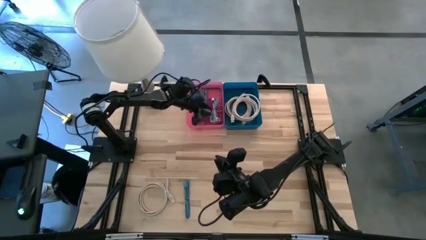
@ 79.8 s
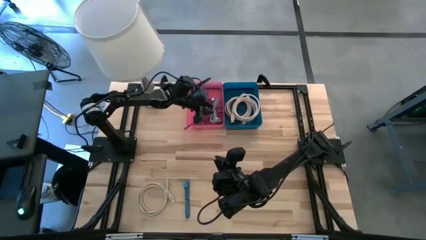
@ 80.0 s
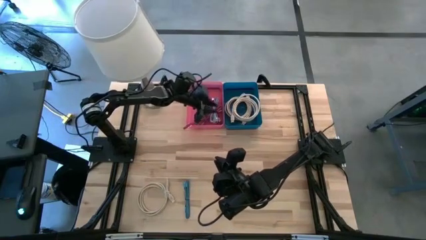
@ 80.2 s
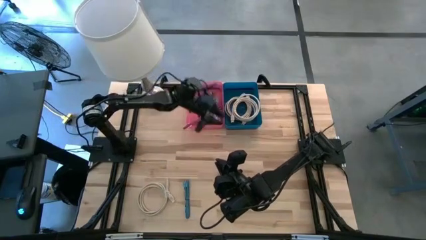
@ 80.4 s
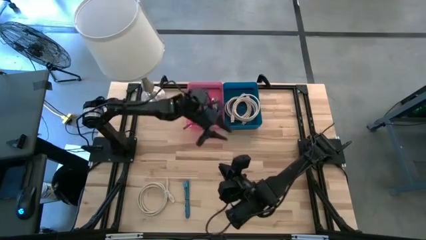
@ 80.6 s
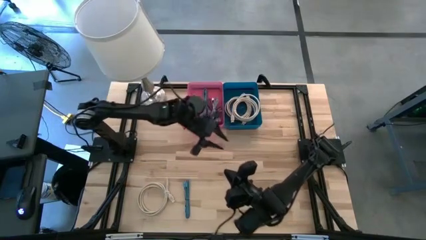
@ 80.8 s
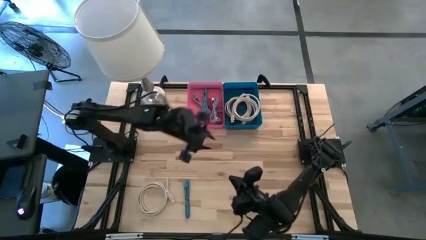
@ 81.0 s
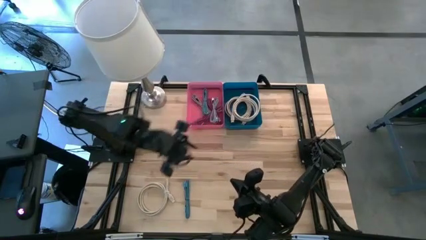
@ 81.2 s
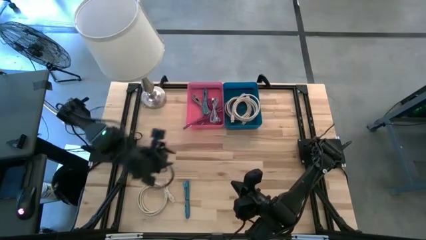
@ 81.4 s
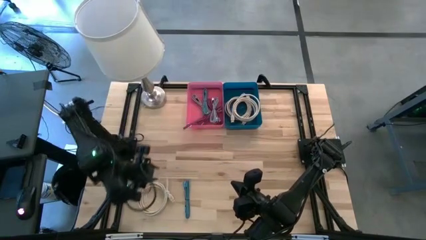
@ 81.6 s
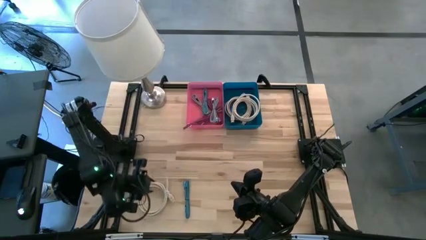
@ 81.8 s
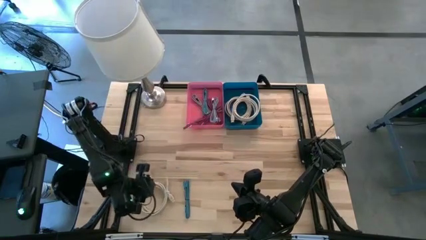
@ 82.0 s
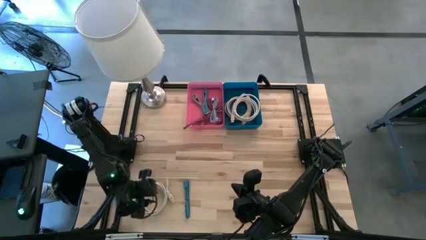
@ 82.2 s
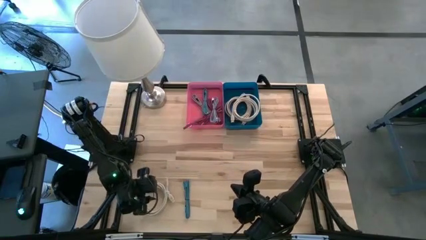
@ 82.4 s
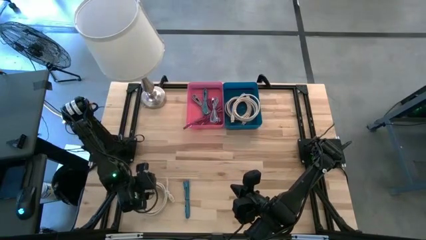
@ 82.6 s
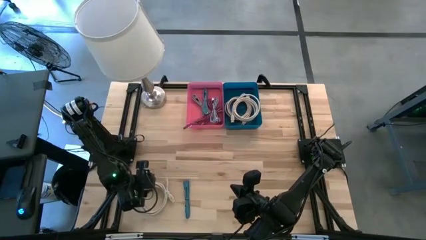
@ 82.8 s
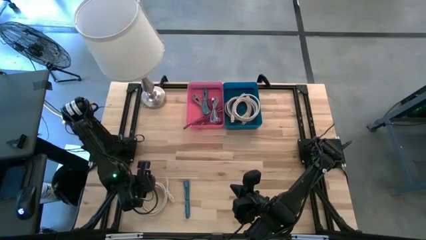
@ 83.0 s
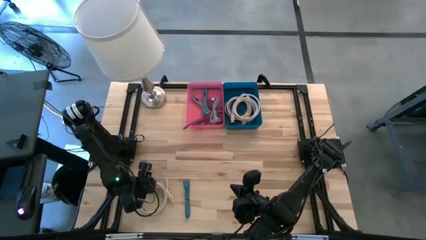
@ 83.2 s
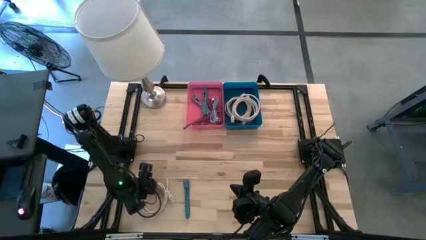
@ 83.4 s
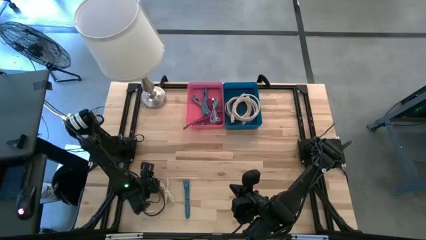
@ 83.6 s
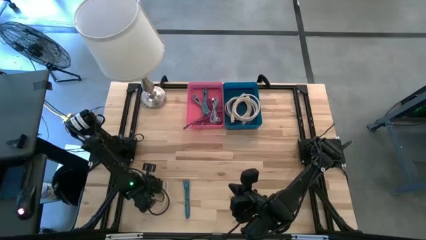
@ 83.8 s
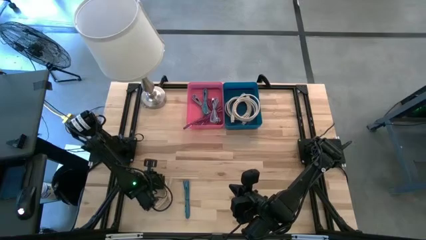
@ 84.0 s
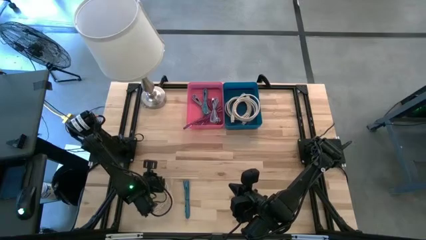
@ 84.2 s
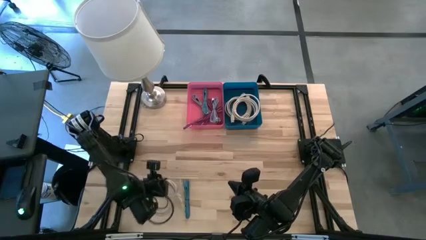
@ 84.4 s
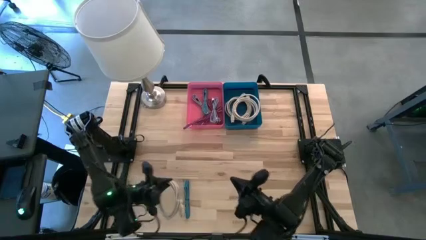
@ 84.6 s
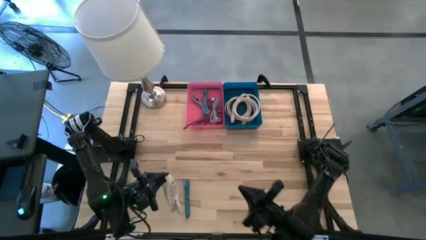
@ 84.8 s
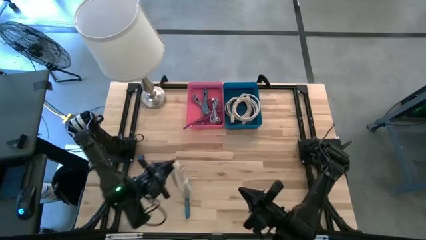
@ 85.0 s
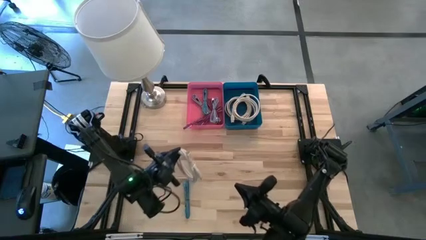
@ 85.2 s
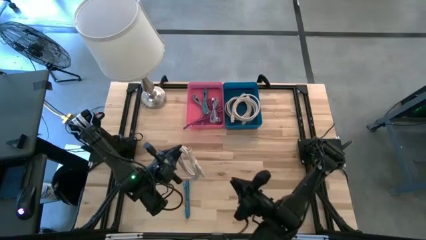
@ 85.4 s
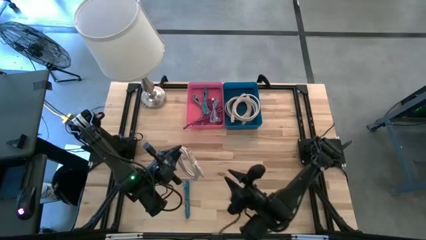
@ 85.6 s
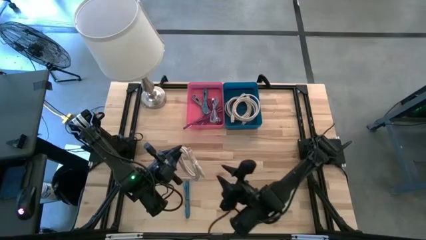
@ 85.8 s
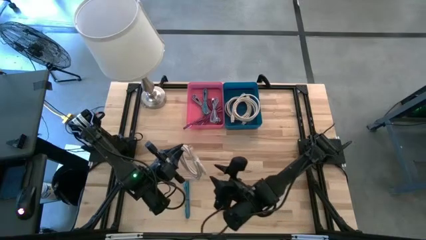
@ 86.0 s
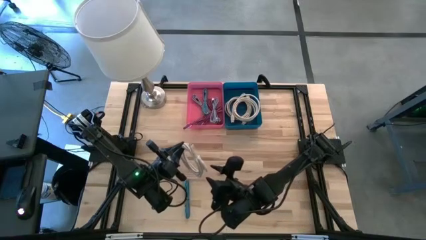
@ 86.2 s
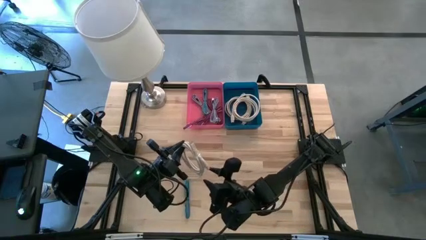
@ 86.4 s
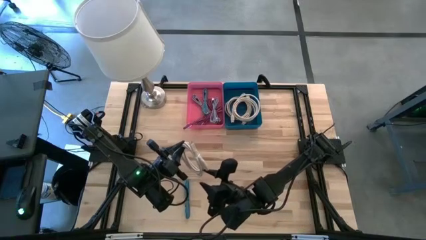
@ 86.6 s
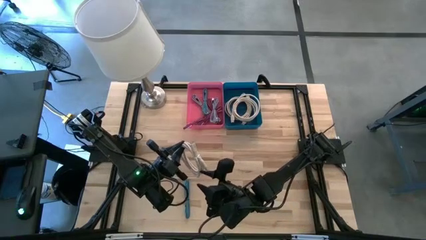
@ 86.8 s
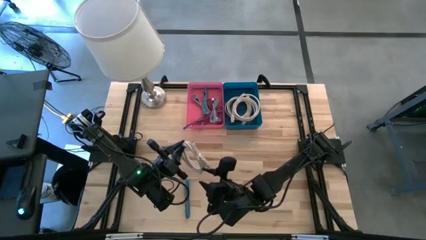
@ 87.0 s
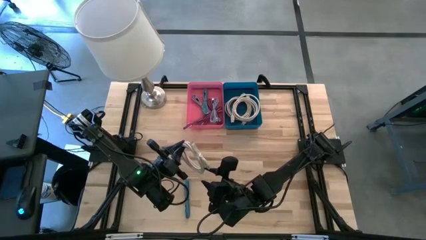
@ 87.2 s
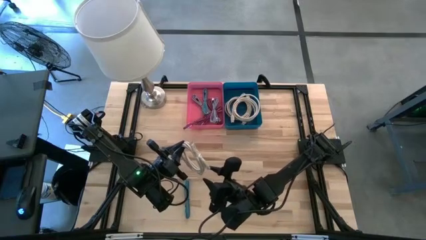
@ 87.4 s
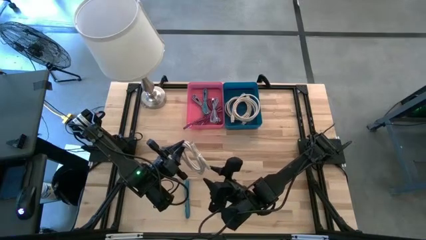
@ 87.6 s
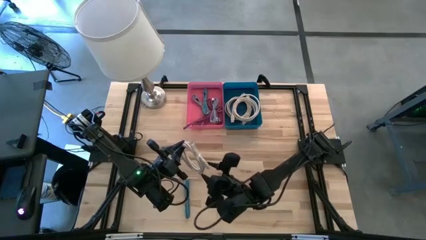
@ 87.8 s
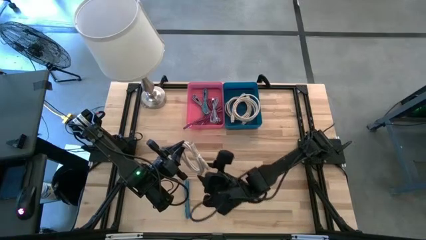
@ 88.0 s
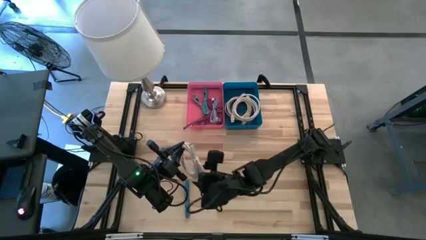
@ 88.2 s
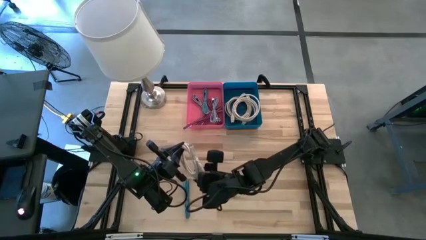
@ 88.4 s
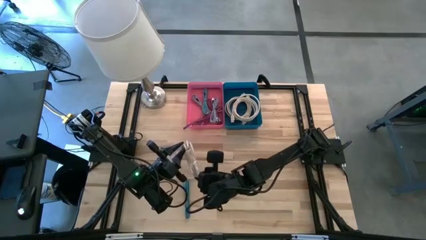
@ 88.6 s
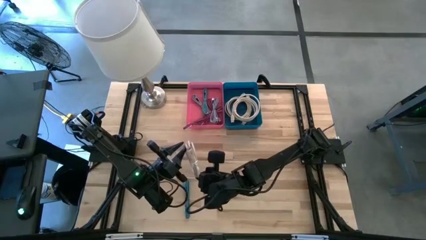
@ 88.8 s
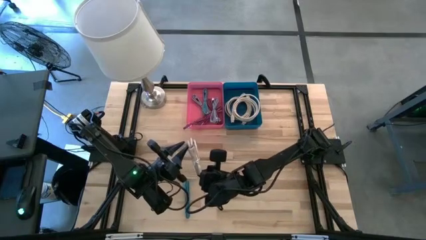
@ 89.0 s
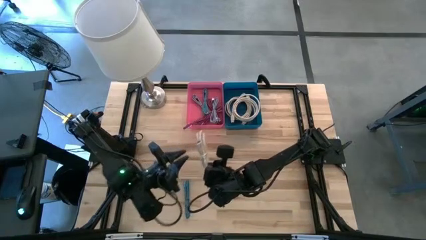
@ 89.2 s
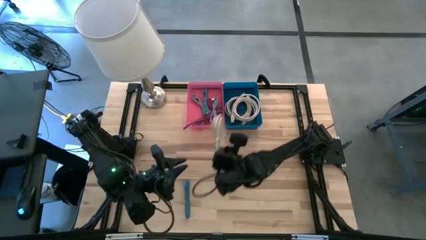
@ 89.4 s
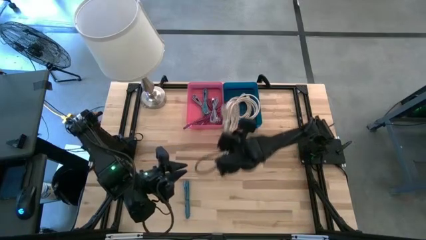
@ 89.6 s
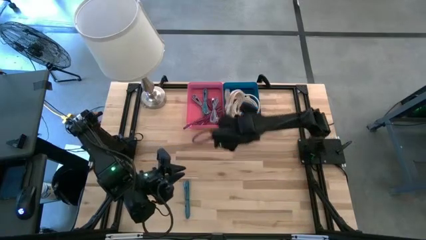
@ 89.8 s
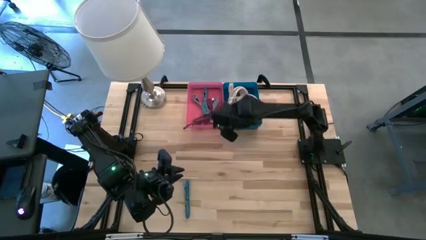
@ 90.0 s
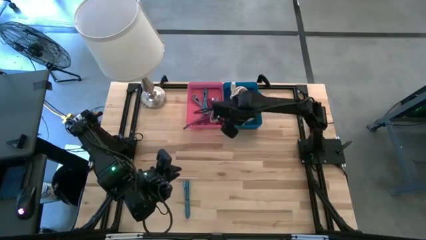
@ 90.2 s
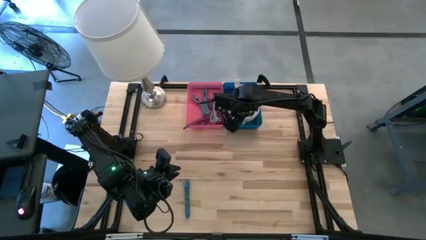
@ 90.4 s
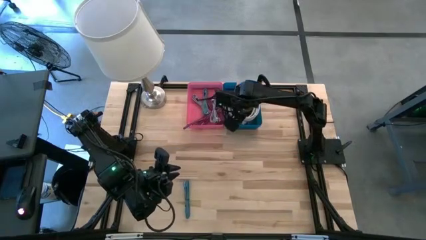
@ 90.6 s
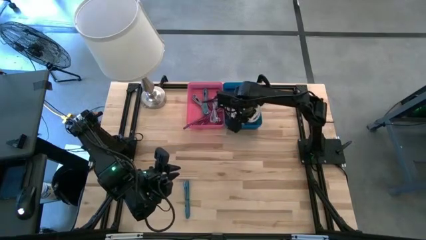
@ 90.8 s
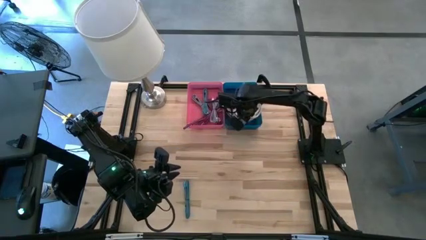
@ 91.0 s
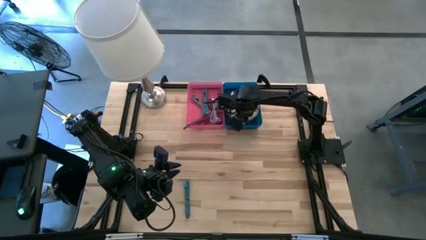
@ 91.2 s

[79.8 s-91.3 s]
Task: Pick & Place USB Port
Put the white HDMI cable into the blue bin

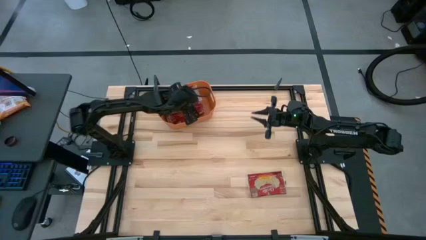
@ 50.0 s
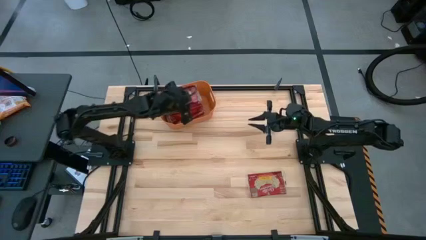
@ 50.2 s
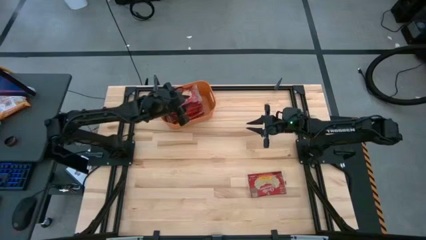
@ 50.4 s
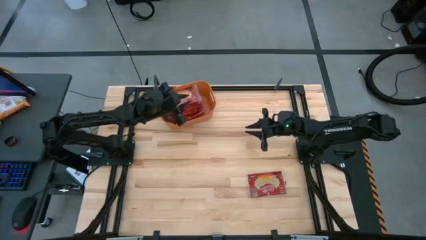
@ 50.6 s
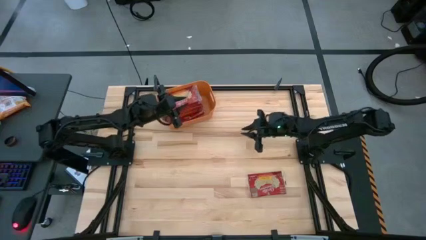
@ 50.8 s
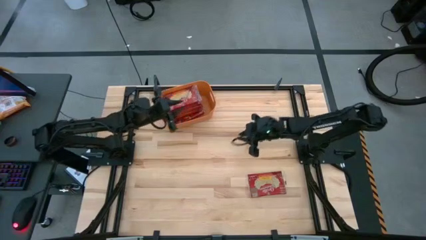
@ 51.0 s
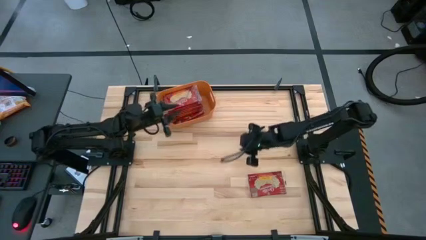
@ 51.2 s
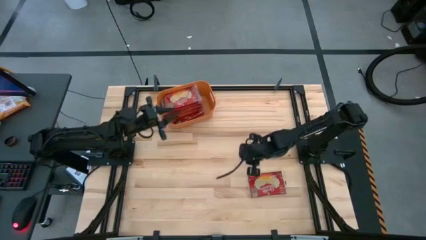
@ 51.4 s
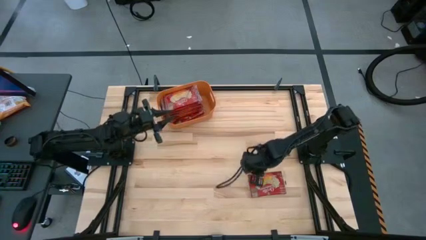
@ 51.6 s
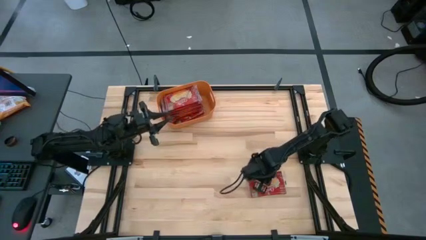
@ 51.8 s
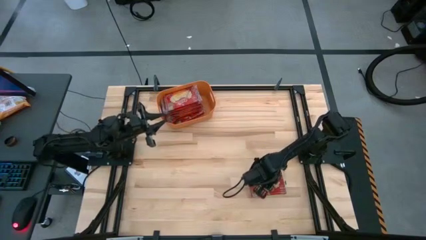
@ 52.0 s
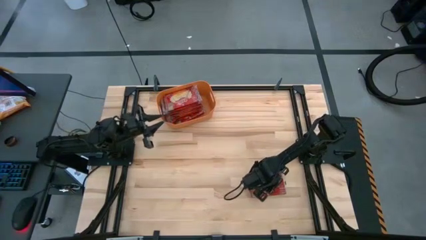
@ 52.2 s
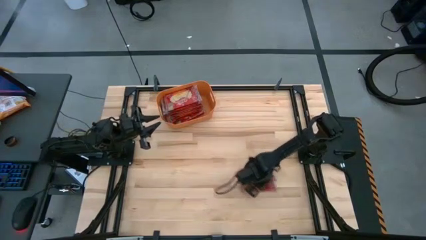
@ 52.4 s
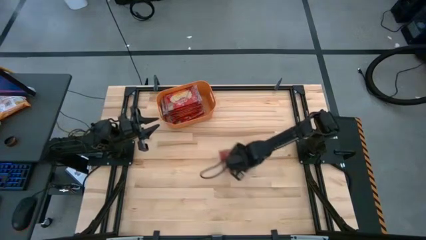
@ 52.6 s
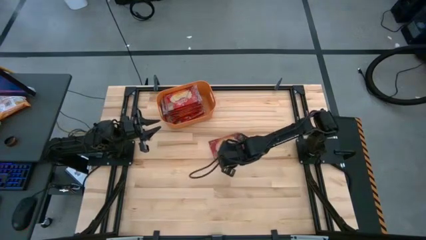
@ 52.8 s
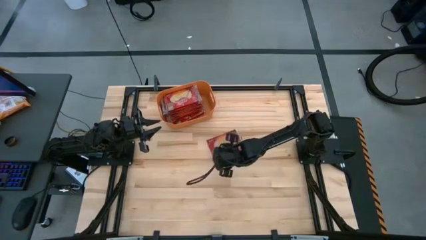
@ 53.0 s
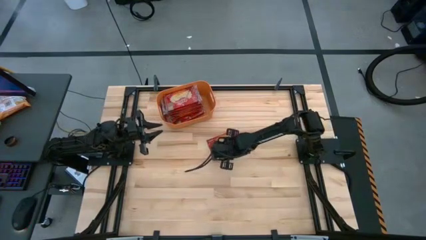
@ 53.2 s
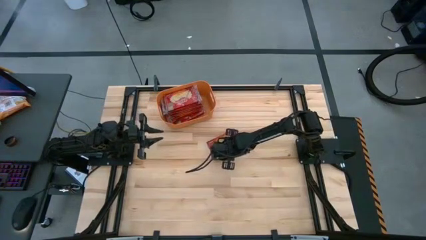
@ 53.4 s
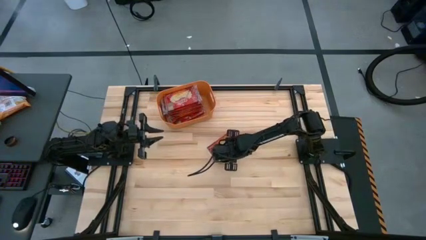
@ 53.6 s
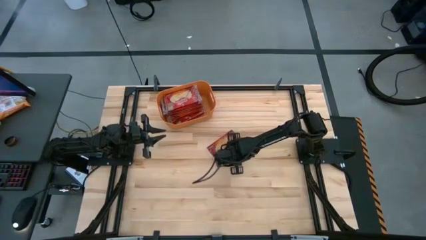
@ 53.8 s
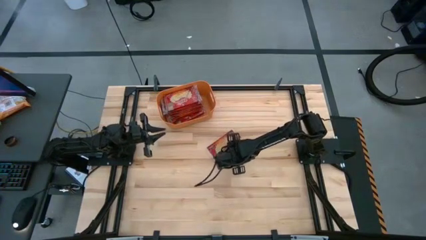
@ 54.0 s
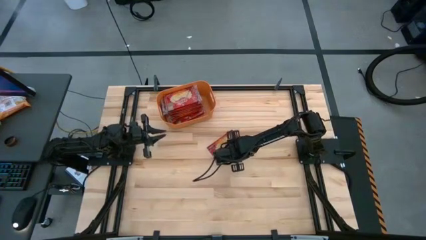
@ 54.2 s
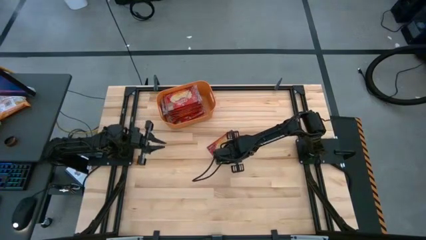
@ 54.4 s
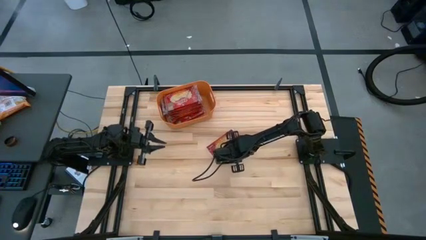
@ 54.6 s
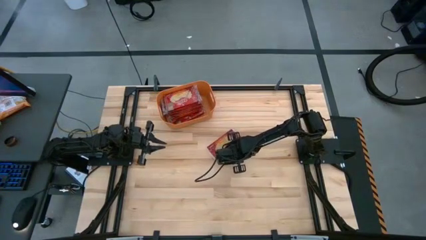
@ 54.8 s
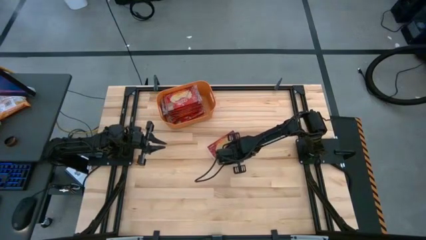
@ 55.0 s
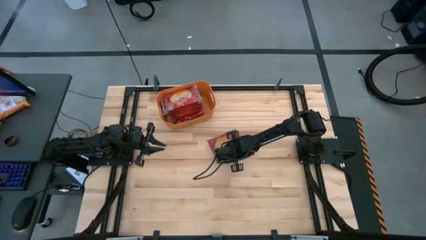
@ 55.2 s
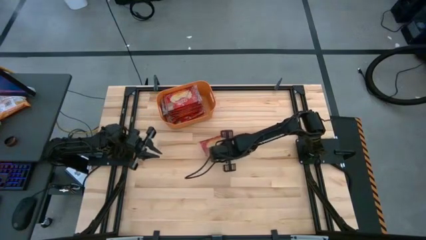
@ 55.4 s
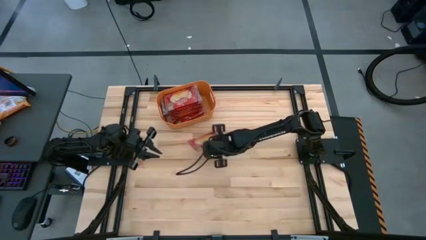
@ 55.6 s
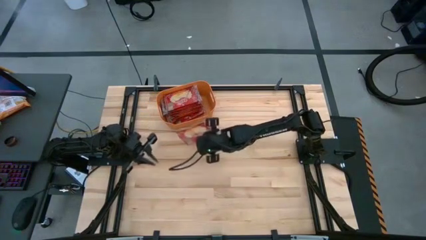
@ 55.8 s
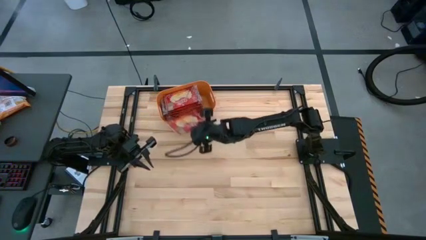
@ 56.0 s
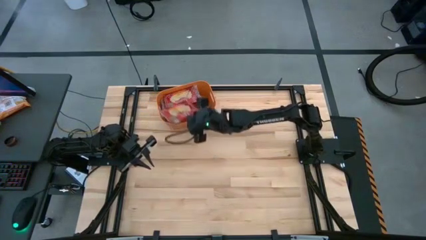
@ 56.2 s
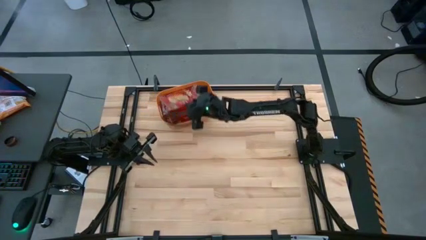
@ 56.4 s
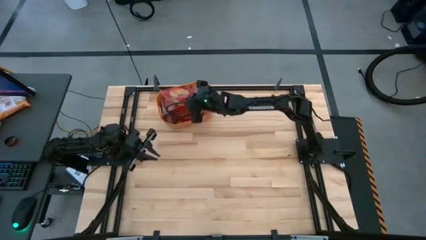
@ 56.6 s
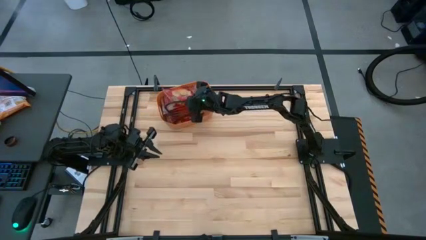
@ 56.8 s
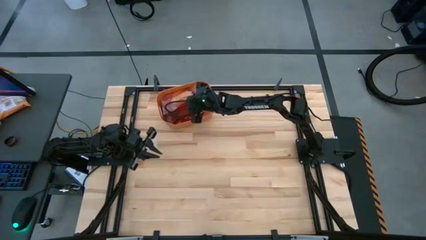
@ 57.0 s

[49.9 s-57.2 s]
Task: Sort popcorn bags into baskets
Put the red popcorn pack into the orange bin
